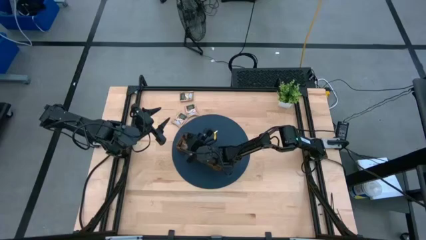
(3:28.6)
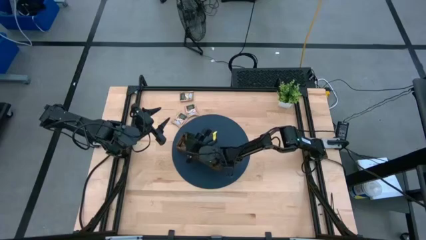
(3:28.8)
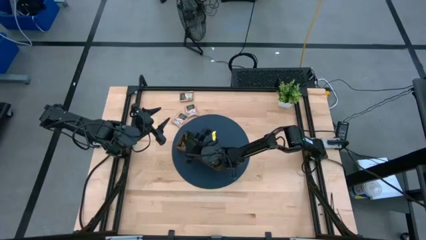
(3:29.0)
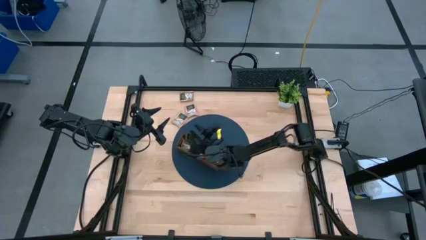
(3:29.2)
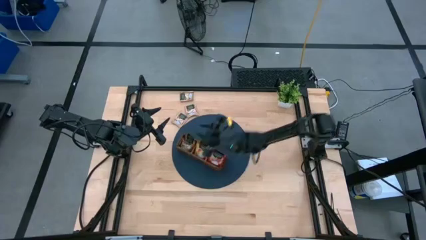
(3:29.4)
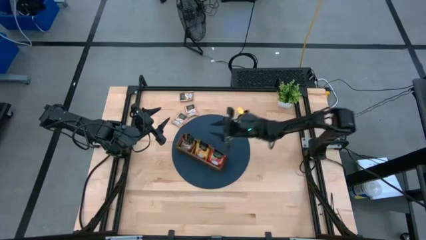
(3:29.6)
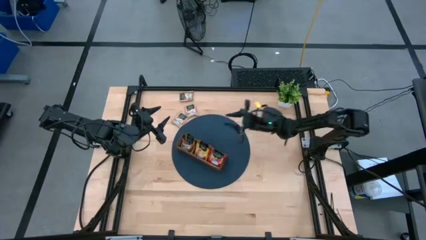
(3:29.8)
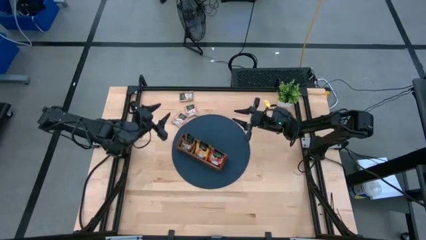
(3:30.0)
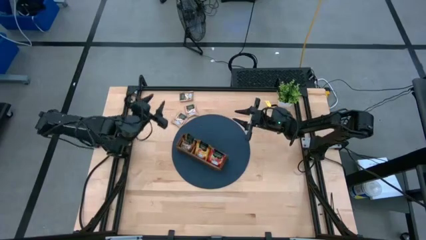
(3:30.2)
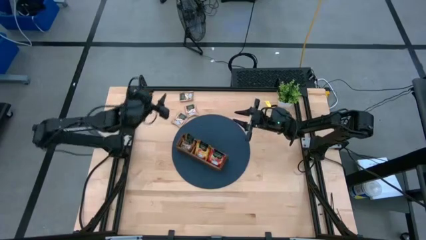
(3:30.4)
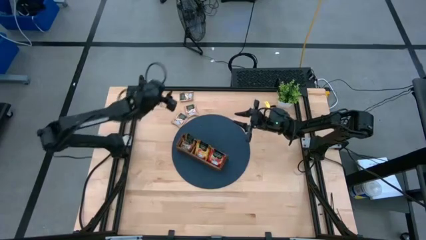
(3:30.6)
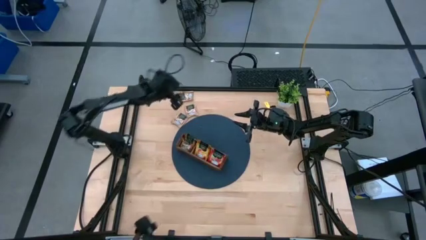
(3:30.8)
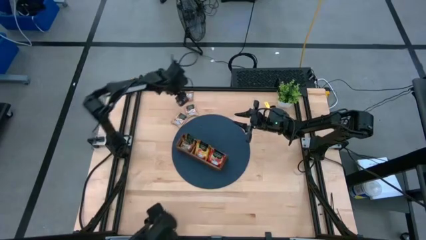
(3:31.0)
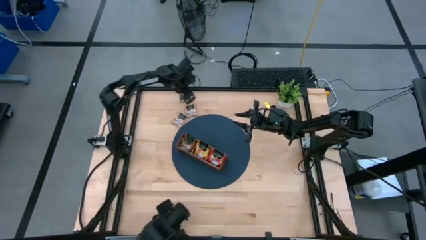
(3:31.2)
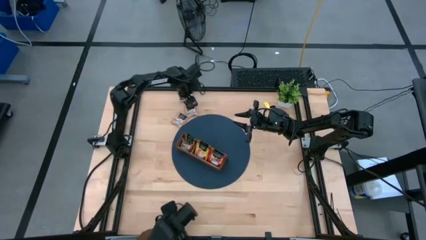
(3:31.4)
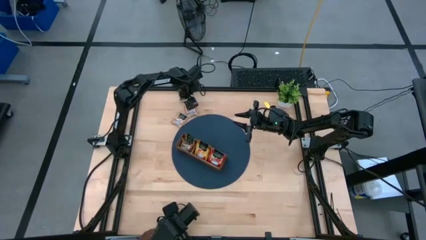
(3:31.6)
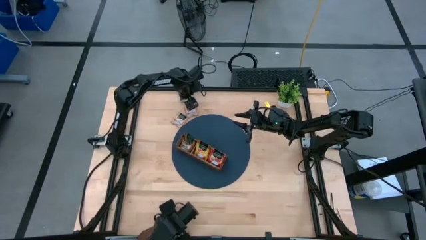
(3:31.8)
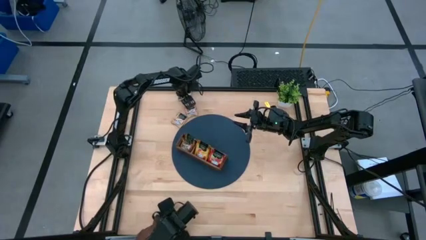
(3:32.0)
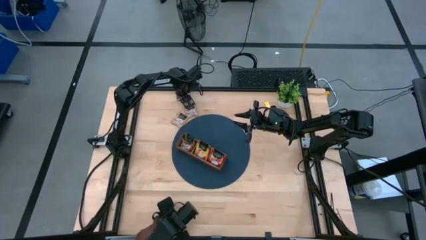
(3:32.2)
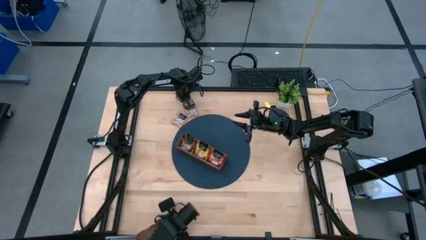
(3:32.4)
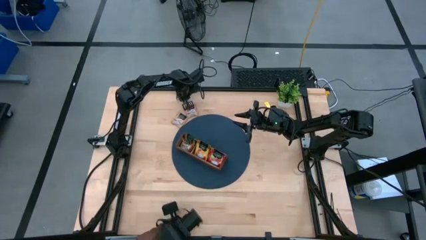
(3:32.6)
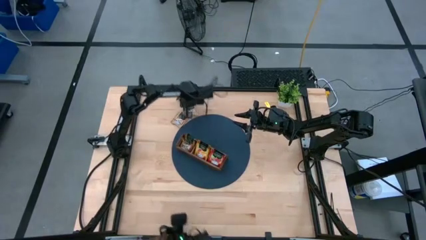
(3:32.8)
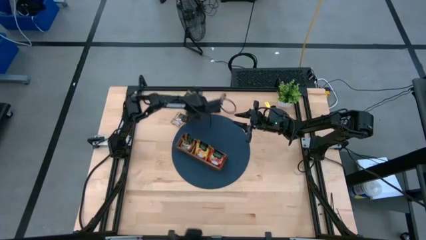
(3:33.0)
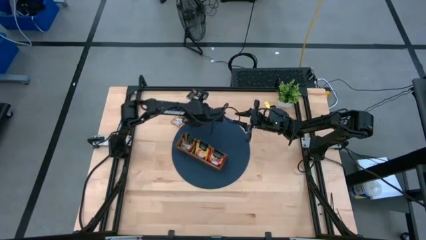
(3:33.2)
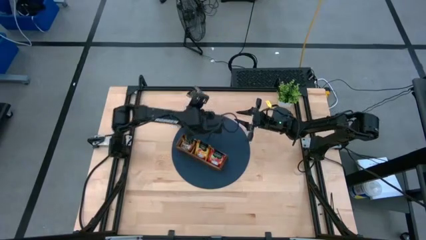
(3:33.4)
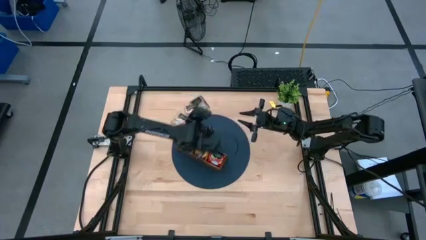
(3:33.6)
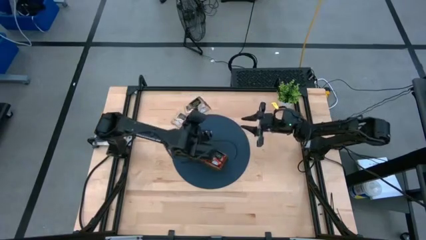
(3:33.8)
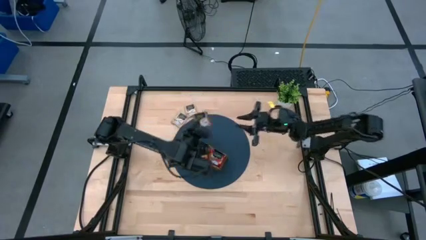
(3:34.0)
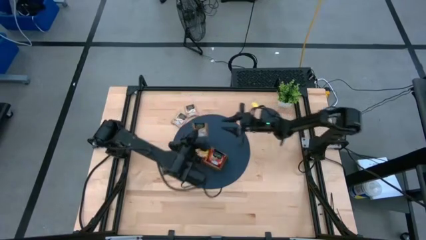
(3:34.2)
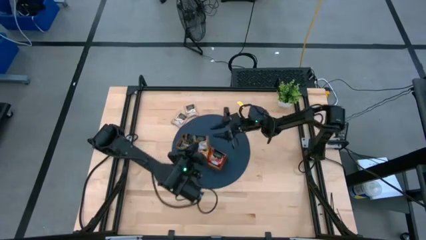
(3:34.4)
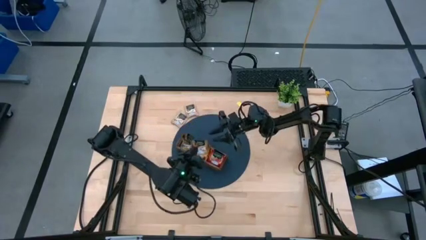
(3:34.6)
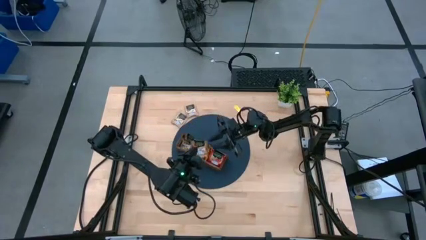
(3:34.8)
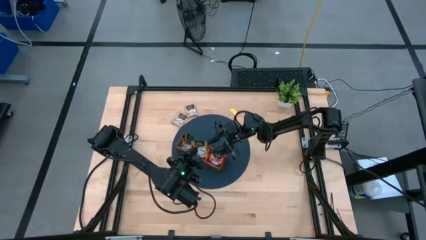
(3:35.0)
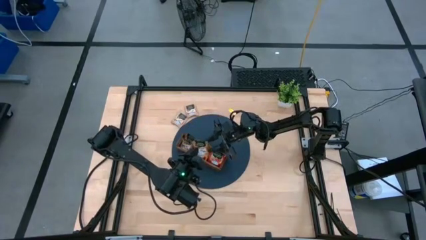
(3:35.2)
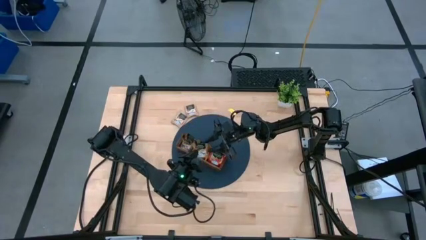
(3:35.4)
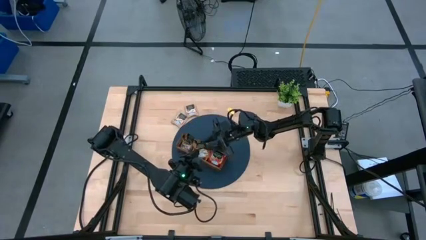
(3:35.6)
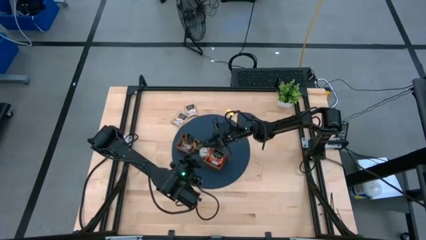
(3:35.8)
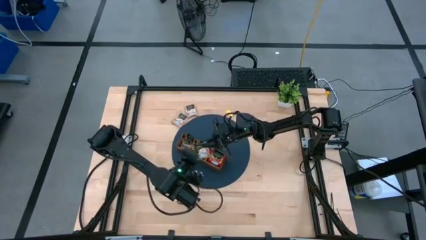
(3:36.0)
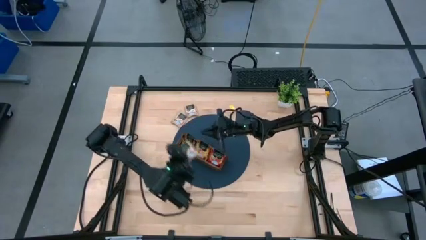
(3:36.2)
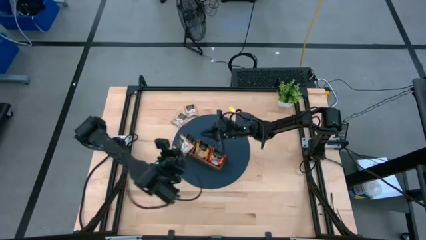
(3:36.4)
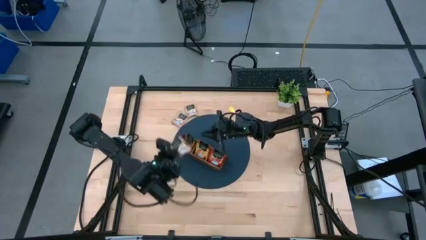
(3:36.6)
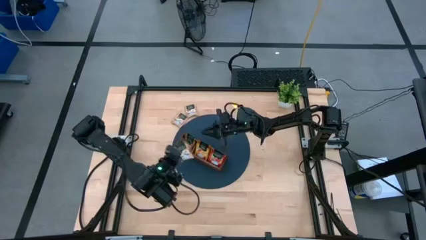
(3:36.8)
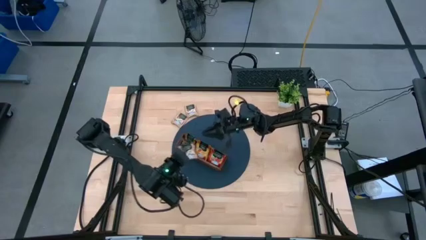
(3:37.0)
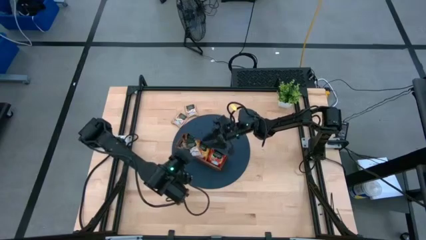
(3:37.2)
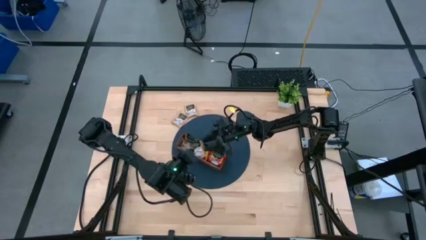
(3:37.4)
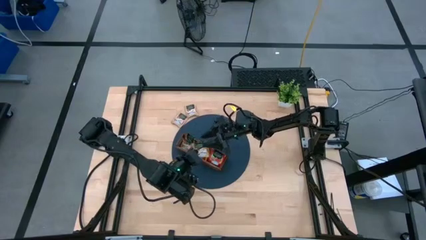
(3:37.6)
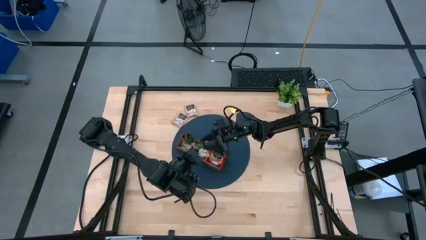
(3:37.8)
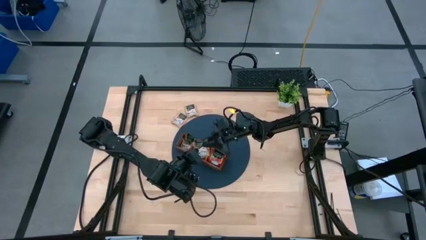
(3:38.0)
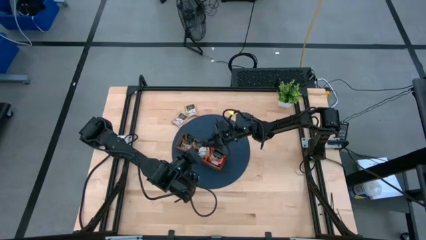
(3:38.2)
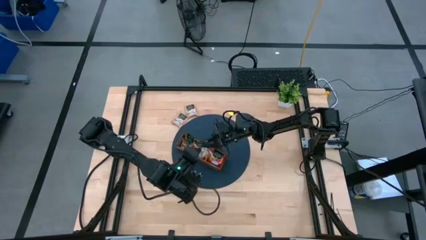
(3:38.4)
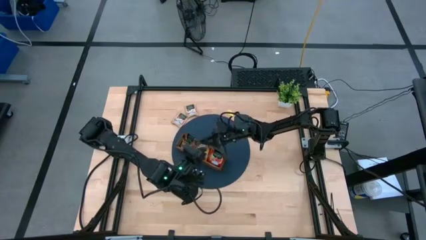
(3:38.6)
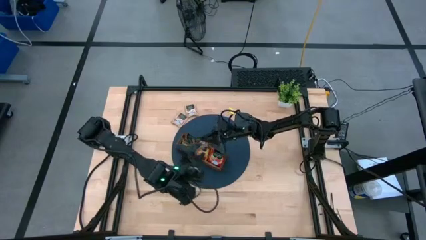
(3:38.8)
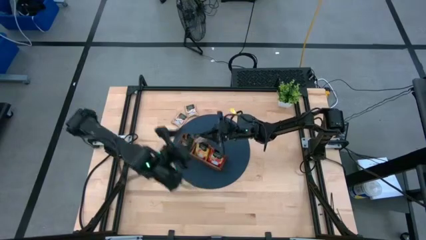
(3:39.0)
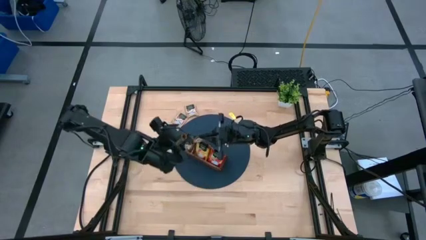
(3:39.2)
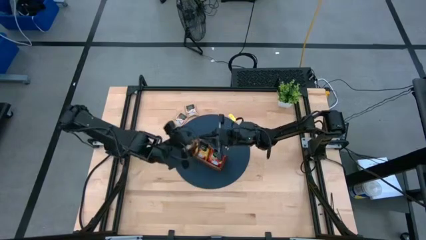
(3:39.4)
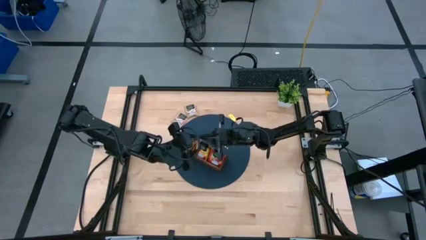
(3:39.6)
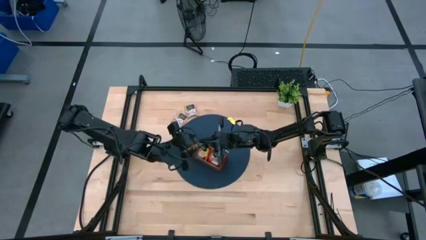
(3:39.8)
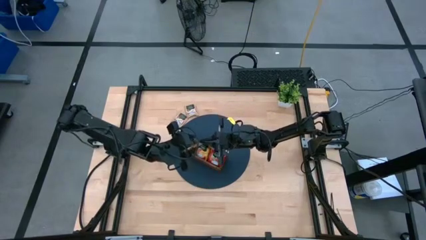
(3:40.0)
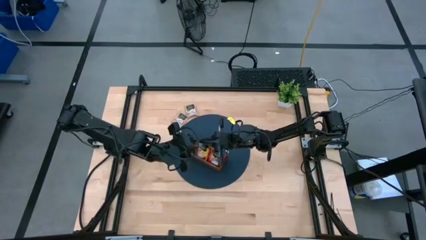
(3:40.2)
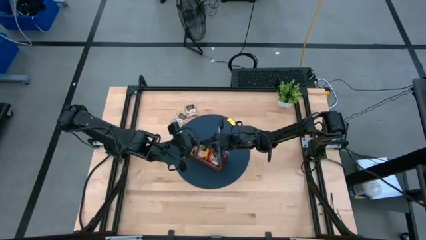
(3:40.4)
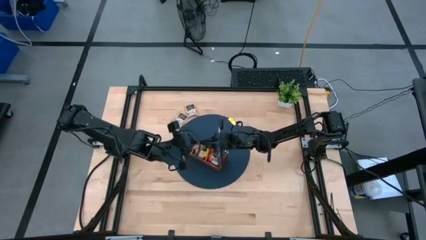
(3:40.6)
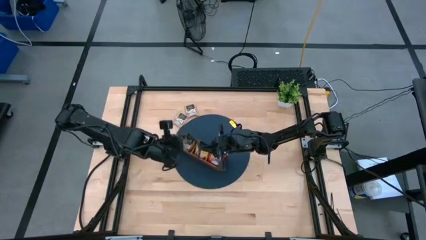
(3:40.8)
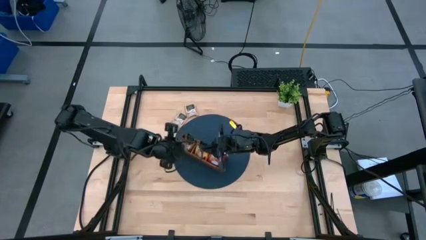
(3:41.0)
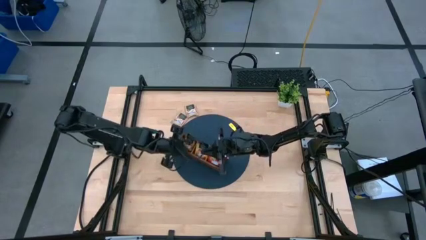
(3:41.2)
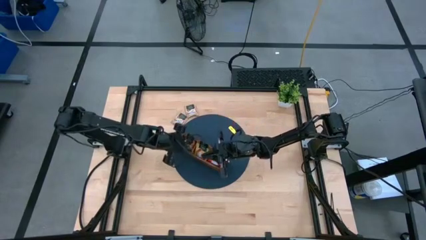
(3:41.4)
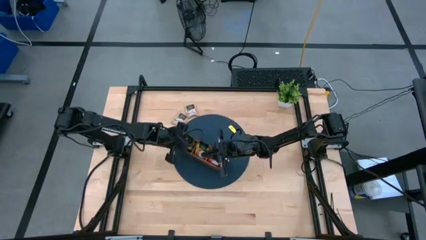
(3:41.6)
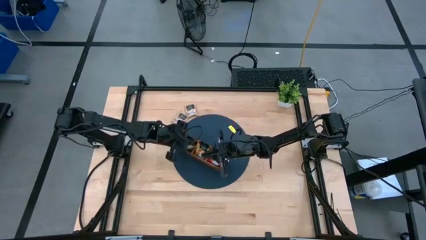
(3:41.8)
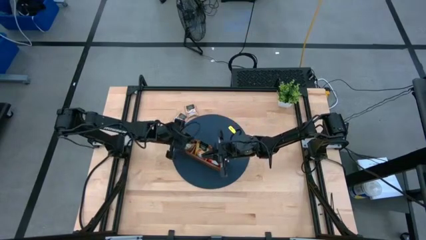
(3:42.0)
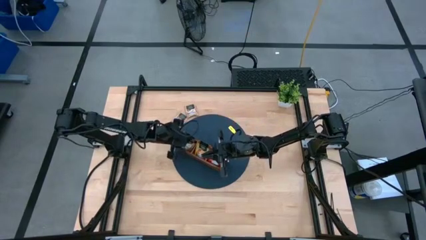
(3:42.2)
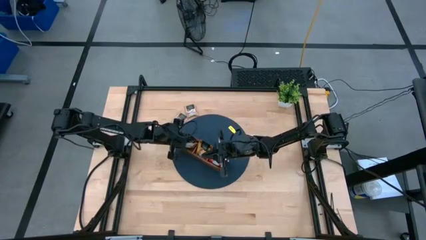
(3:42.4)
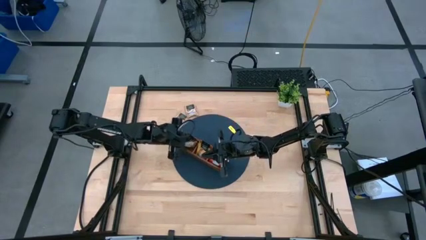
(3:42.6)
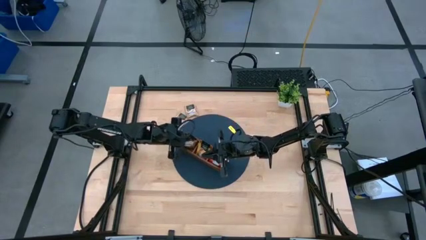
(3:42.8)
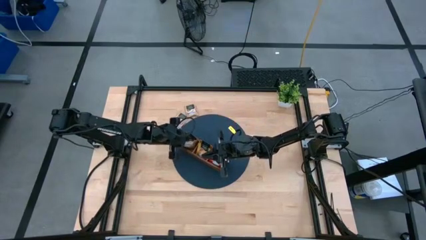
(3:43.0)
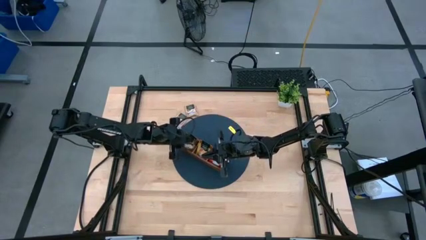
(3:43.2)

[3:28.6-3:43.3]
Task: Pick & Place Tea
Put the brown tea bag into the left section of the wooden organizer

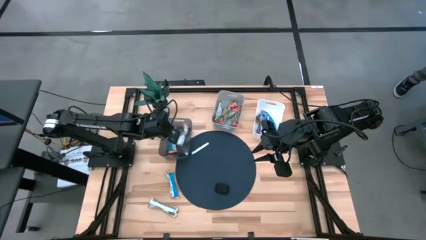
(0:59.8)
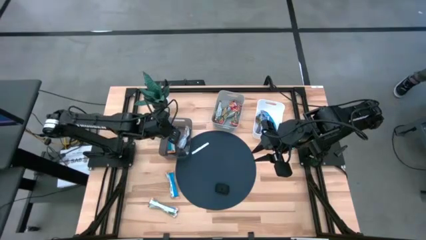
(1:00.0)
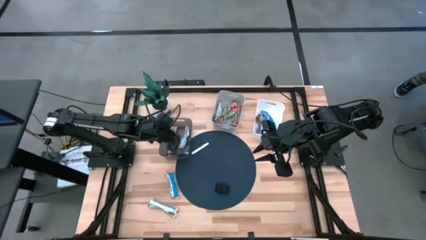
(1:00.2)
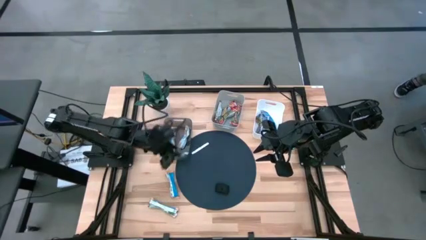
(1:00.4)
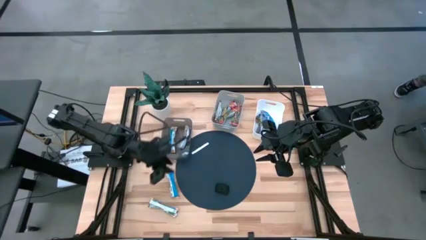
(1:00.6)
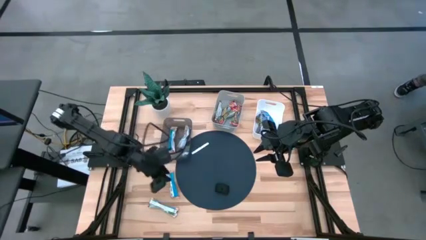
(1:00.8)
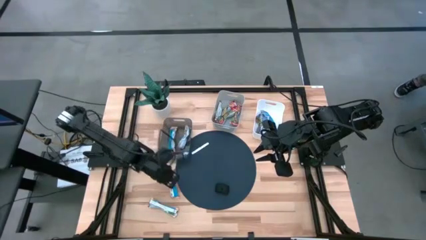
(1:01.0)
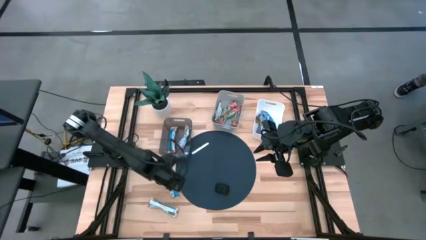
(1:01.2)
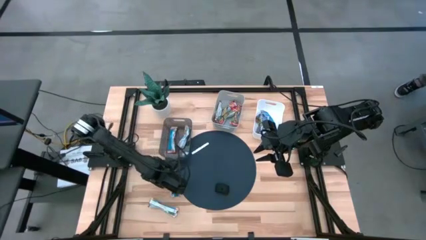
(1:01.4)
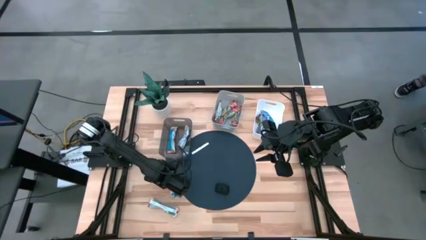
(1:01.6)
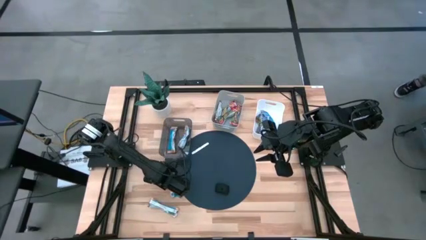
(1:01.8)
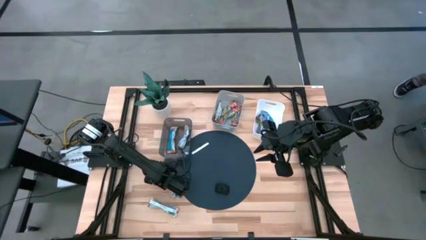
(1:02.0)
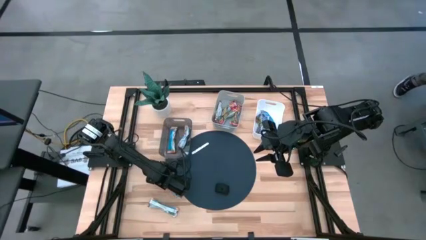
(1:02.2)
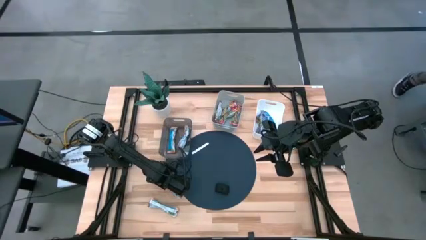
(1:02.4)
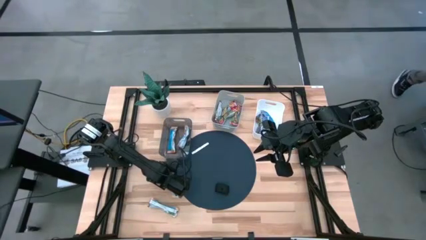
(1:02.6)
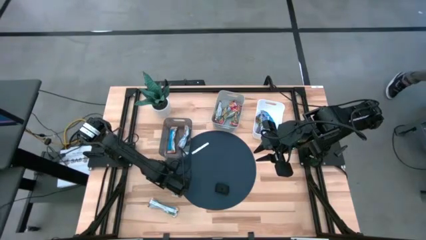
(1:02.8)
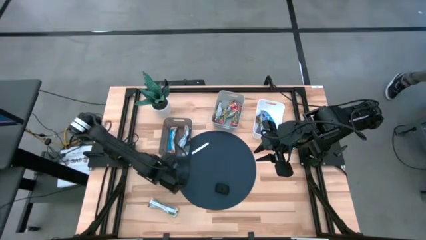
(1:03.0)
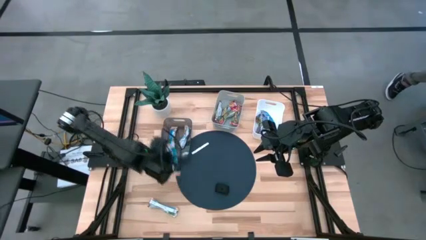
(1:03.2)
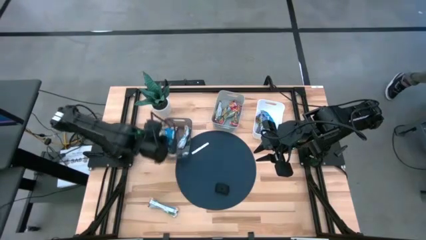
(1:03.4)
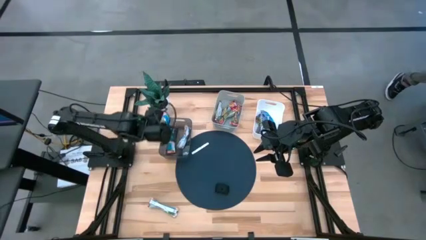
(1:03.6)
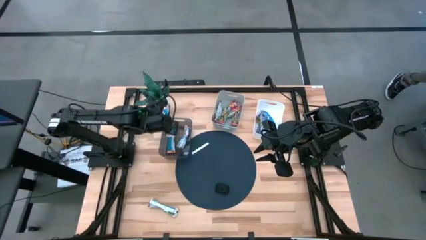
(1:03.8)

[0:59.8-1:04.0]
Task: Pick and place Granola Bars by type
Put the top orange granola bar into the black transparent bin
